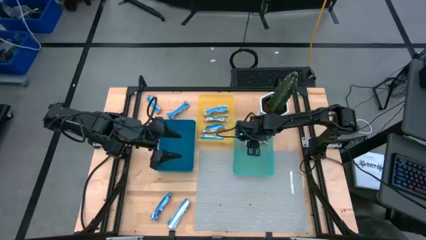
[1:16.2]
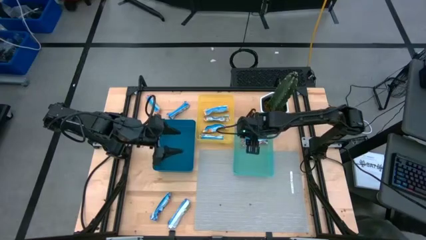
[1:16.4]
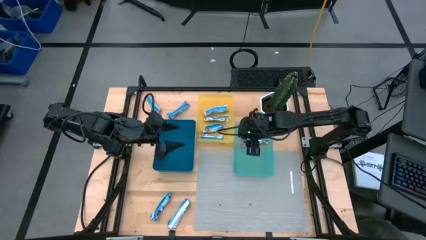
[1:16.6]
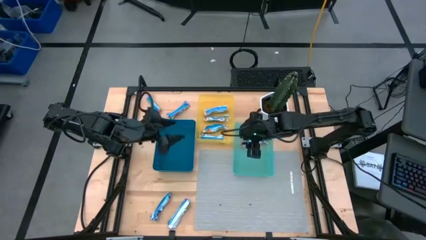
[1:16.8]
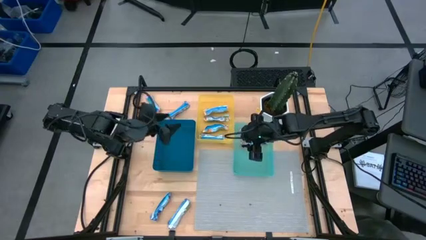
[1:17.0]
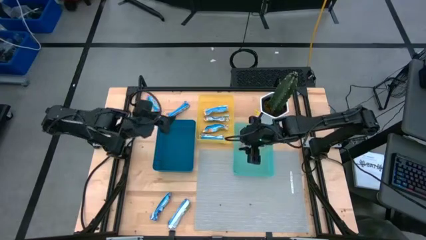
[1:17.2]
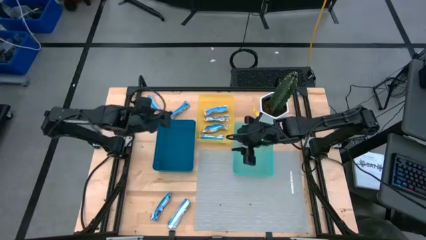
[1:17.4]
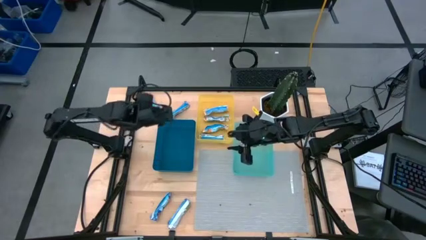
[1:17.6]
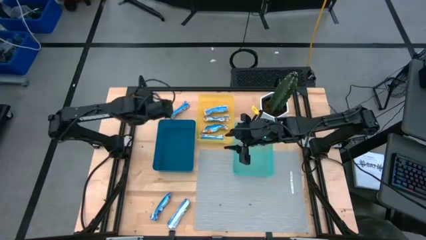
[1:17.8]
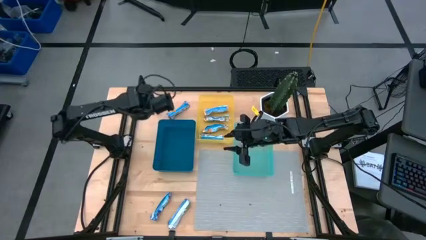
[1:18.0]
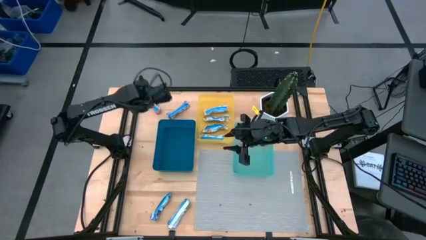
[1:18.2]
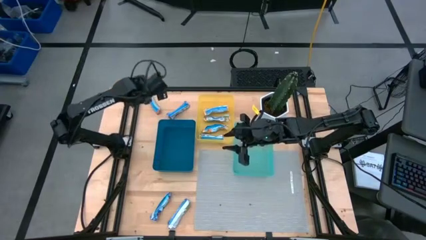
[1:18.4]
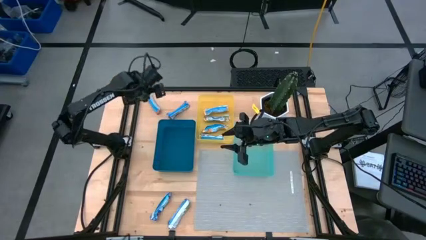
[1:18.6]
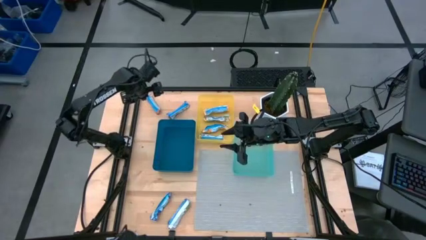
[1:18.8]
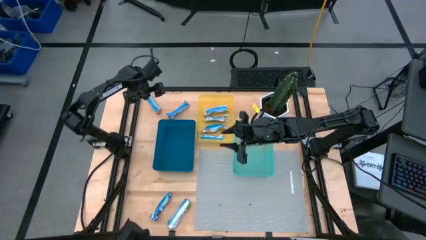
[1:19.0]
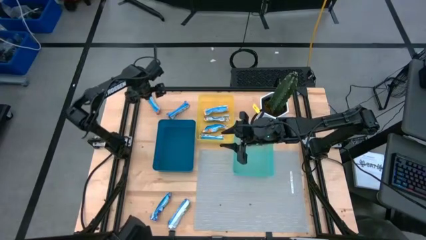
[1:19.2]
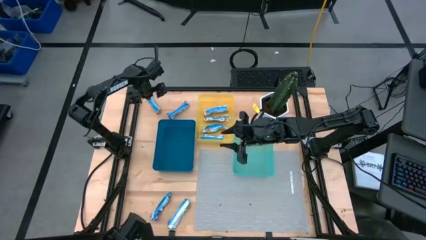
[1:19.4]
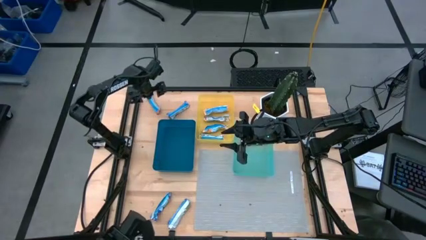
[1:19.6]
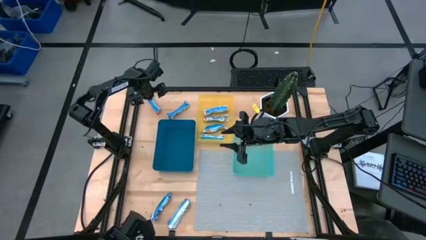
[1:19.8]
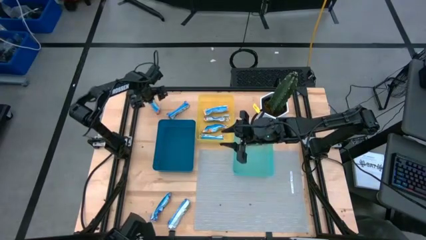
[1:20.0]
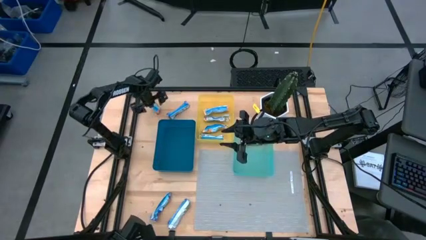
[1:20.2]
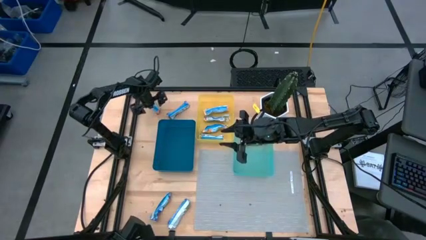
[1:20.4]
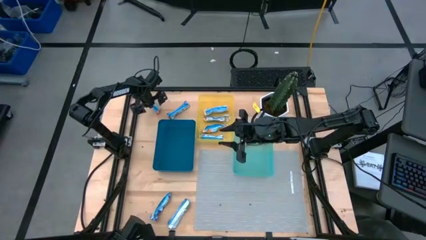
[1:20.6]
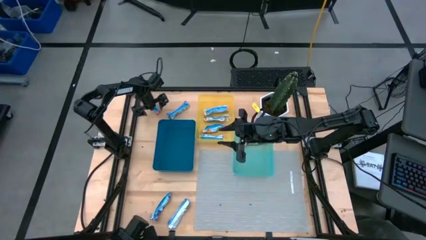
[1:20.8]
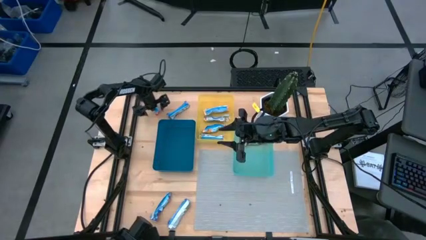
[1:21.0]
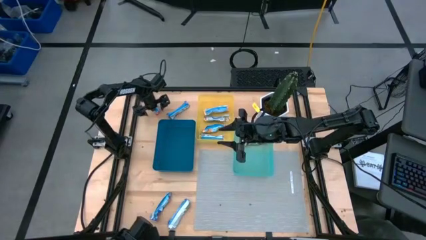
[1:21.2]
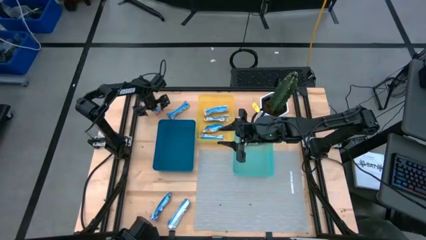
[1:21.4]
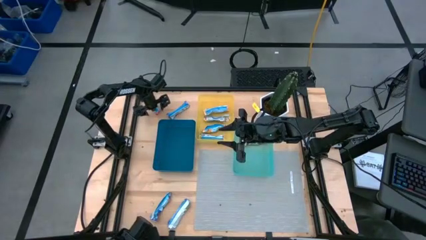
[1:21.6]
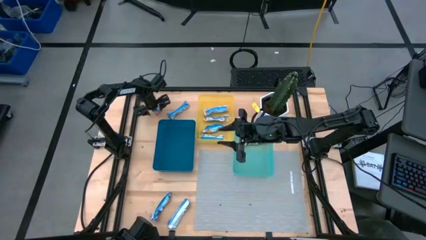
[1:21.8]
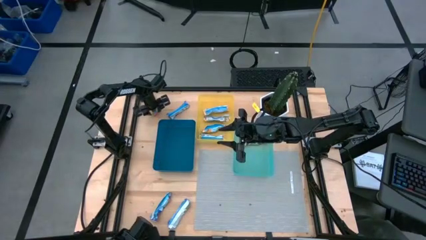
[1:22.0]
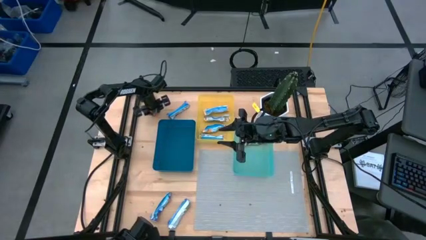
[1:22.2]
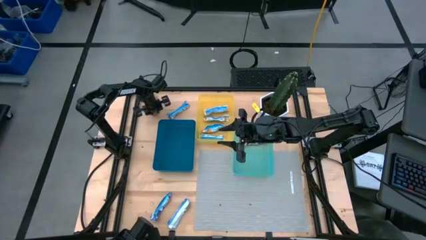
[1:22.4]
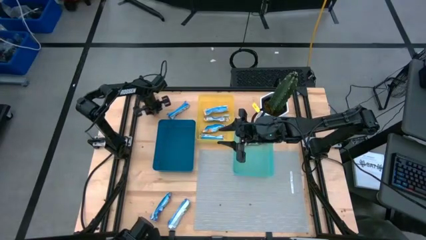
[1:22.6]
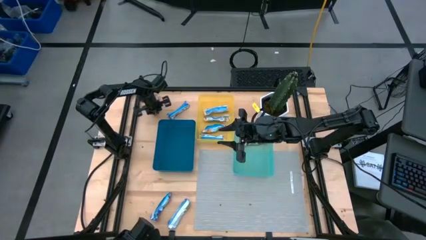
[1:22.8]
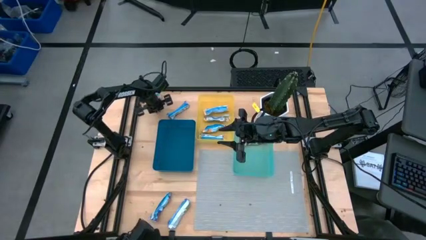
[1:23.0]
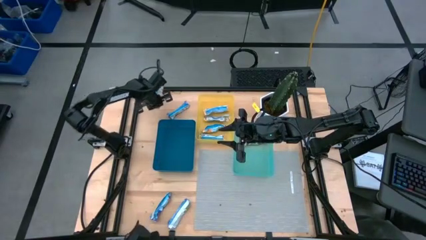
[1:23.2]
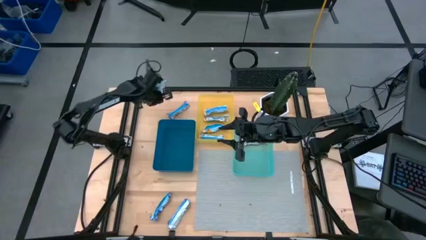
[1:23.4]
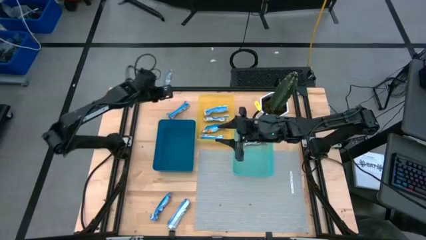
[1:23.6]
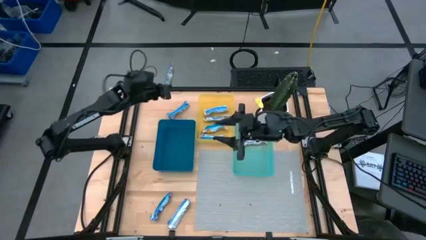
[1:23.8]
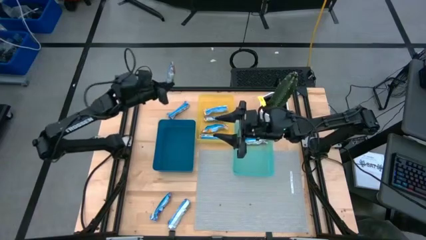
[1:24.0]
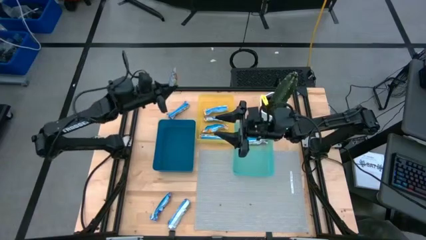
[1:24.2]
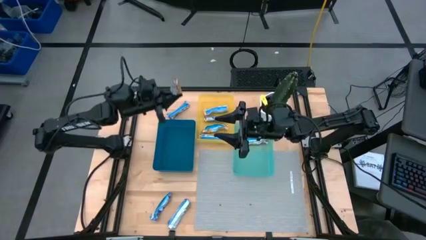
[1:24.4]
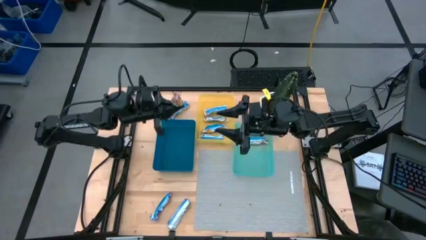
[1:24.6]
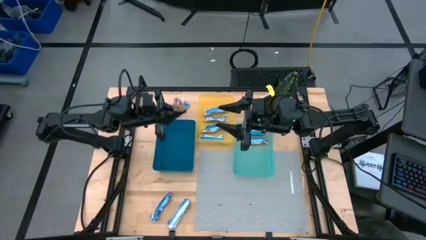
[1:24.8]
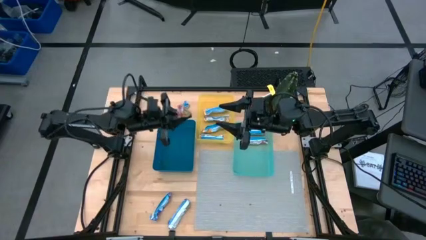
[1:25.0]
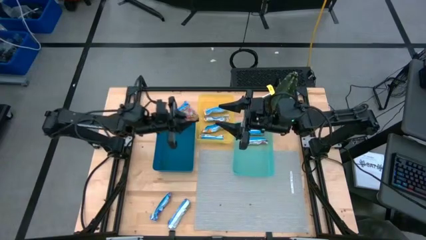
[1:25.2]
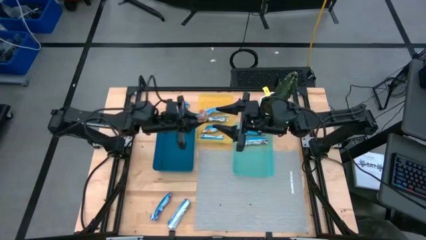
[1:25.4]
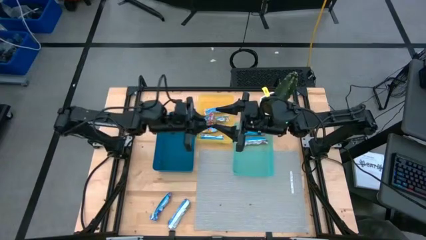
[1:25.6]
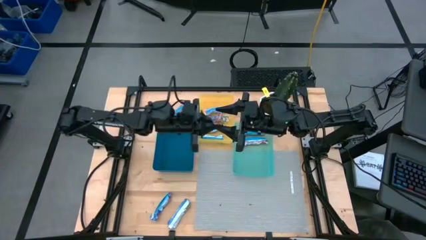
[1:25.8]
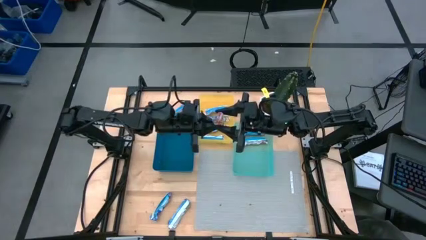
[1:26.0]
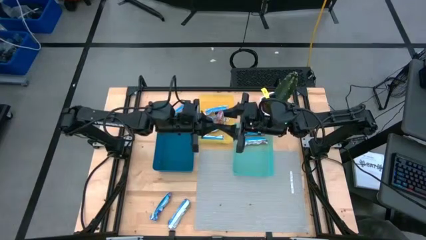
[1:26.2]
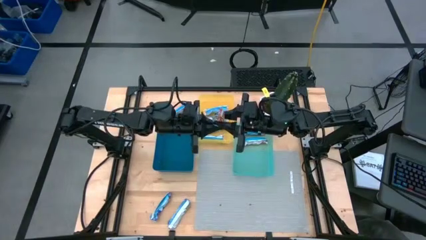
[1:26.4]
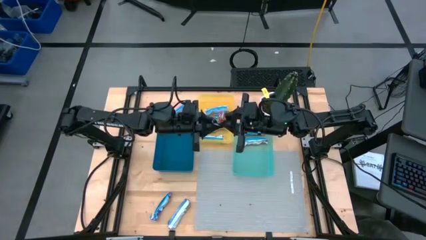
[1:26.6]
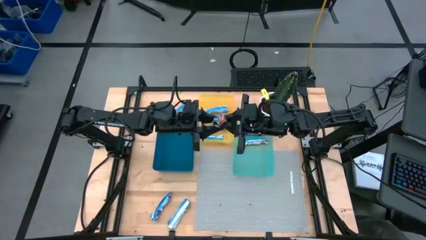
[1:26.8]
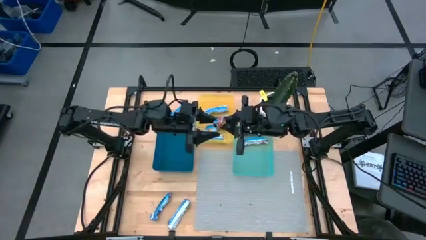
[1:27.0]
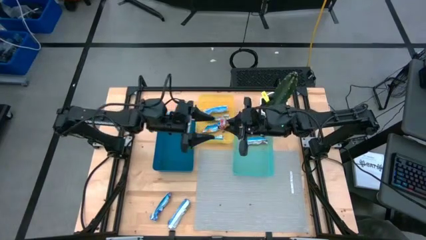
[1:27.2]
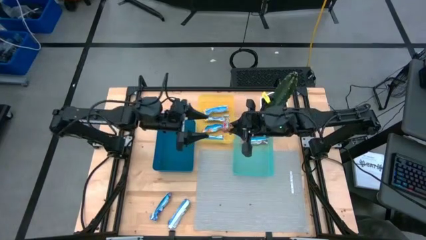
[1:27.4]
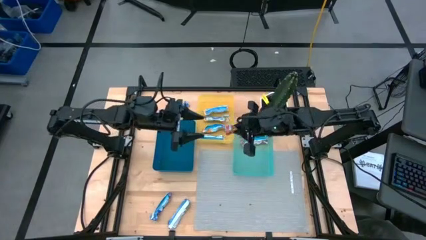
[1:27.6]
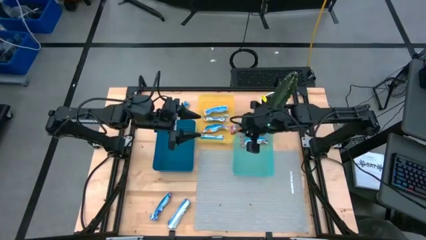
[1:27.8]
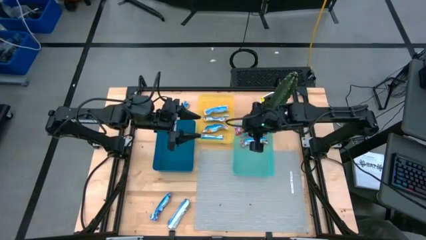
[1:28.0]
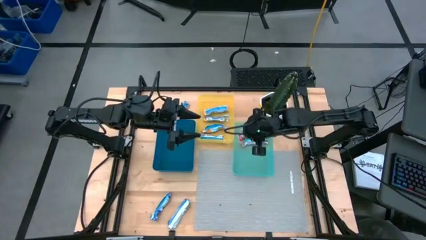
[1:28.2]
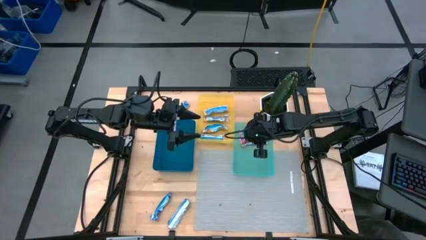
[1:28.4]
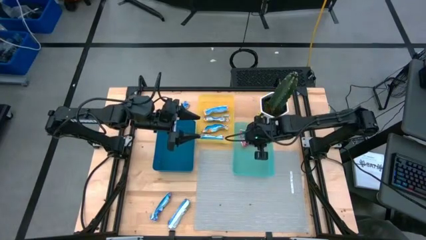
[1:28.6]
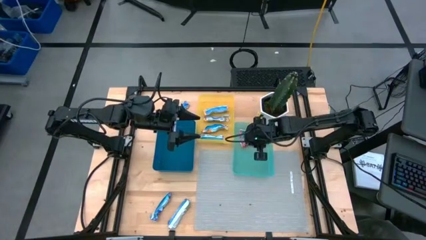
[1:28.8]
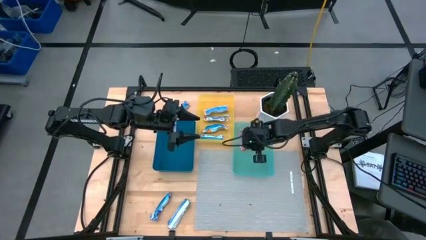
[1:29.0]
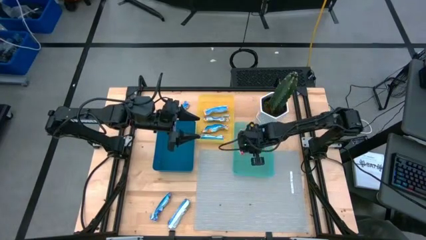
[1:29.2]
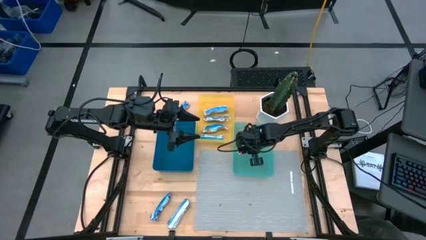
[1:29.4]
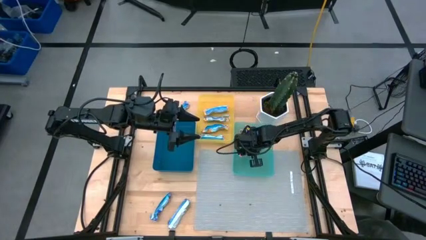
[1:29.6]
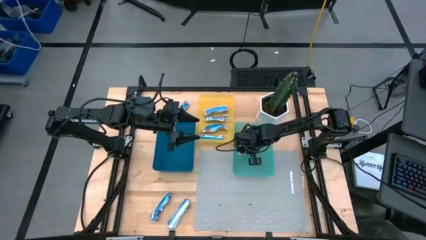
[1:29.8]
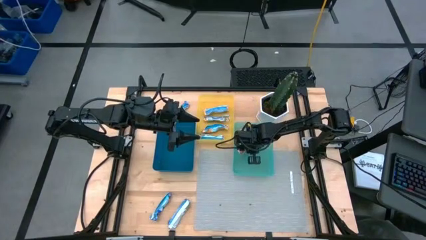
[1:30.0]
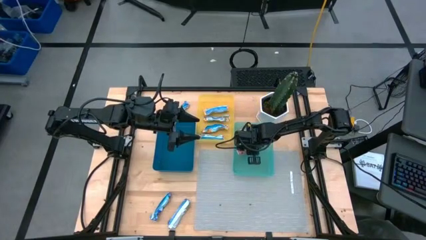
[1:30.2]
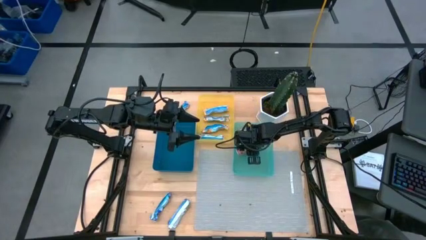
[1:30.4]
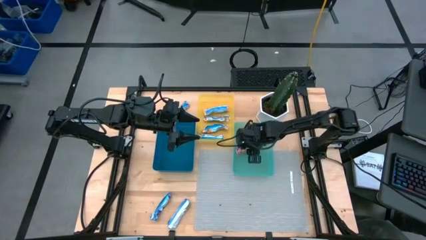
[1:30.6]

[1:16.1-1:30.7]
Task: Pick and place Granola Bars by type
Put the red granola bar into the green bin
